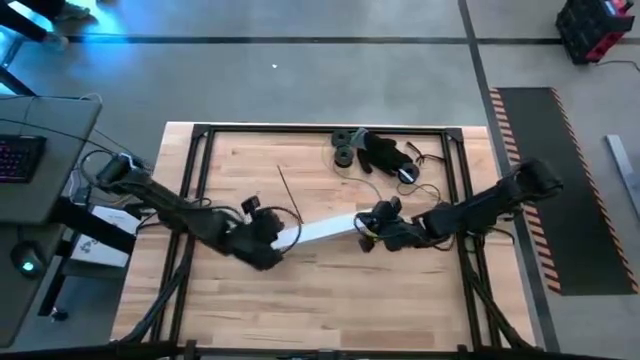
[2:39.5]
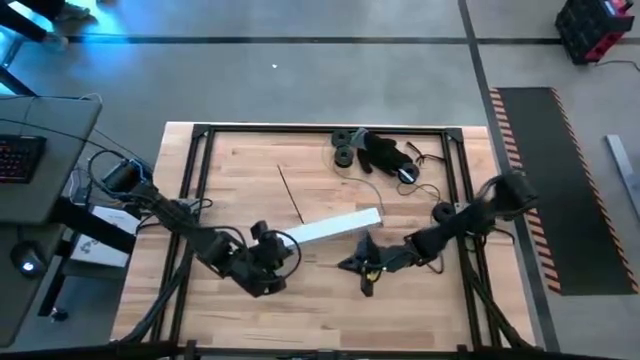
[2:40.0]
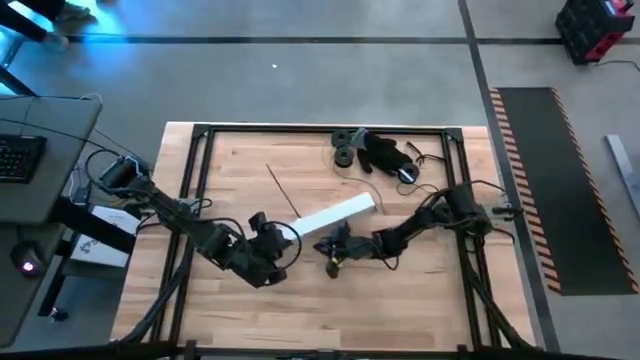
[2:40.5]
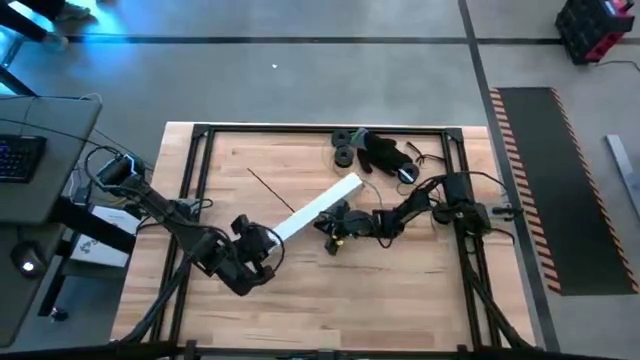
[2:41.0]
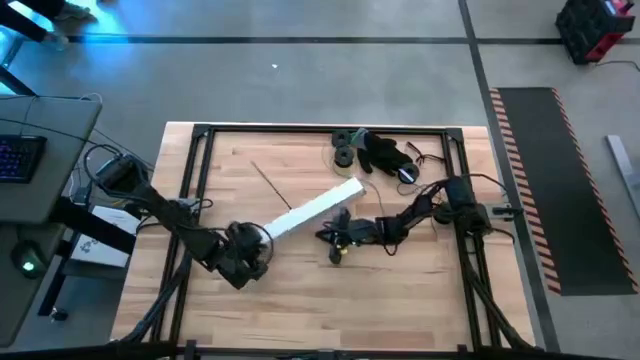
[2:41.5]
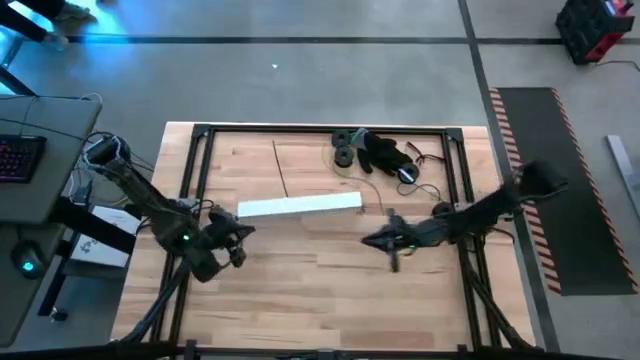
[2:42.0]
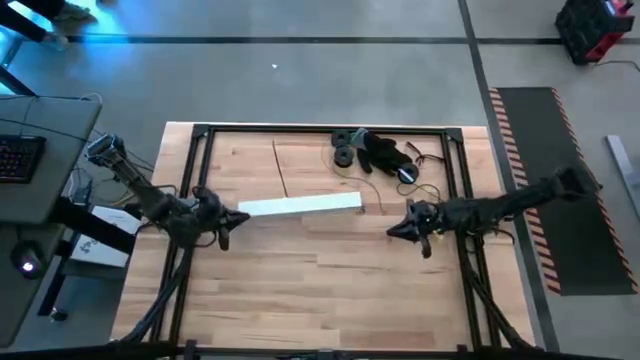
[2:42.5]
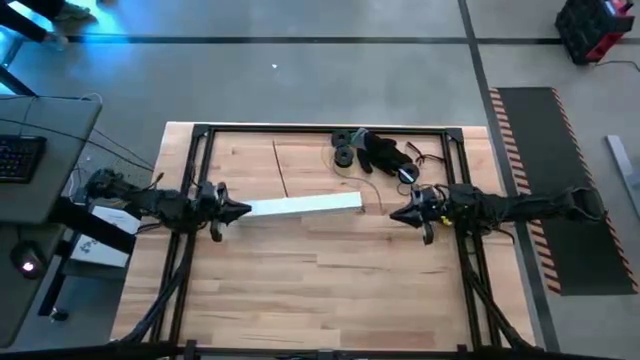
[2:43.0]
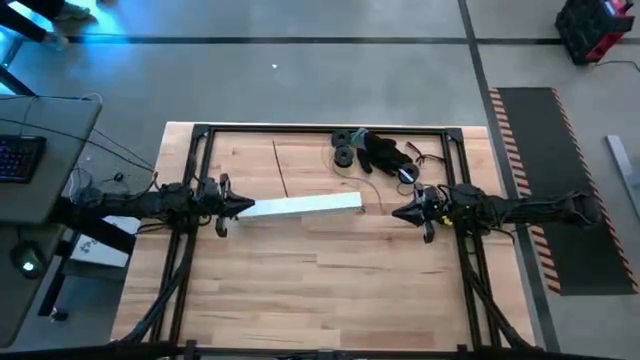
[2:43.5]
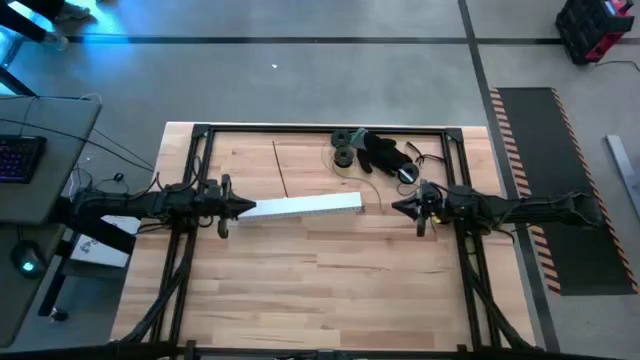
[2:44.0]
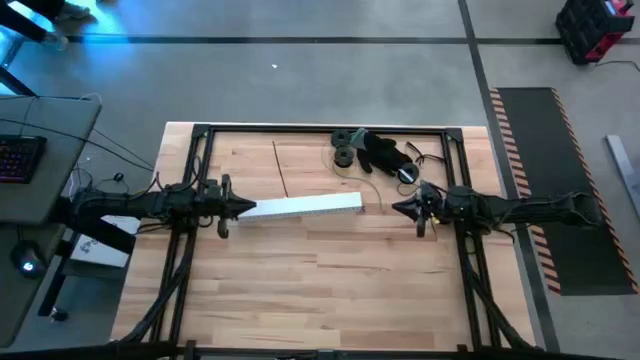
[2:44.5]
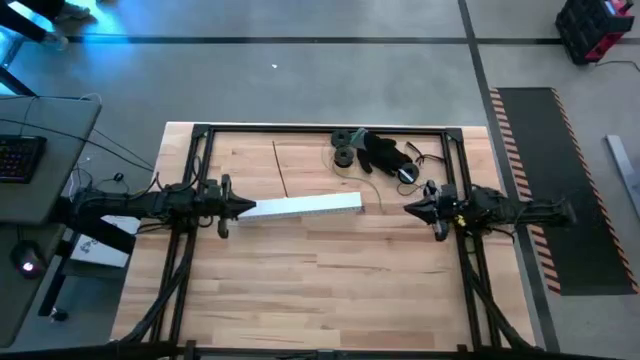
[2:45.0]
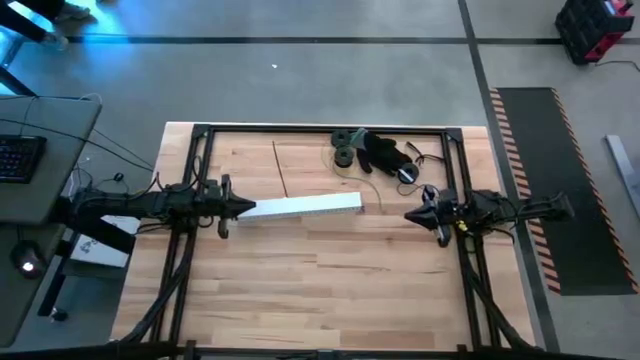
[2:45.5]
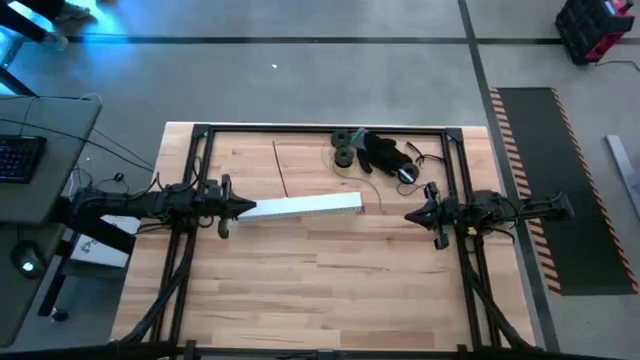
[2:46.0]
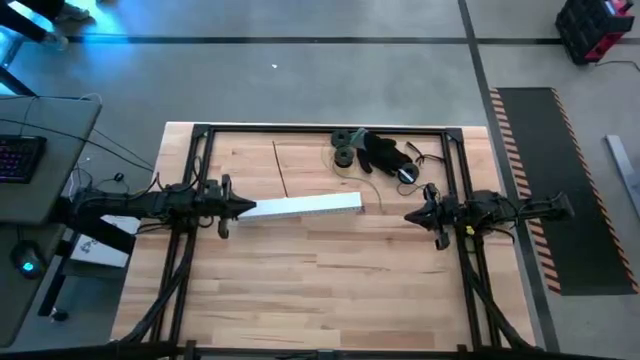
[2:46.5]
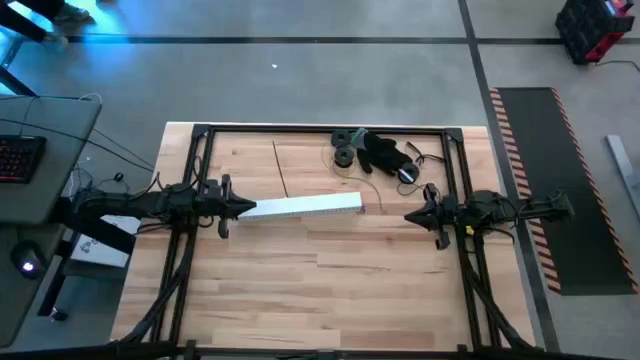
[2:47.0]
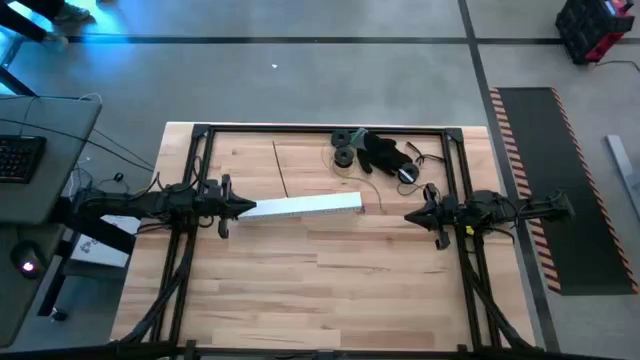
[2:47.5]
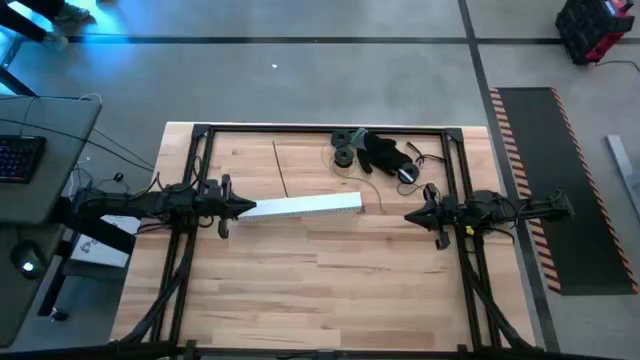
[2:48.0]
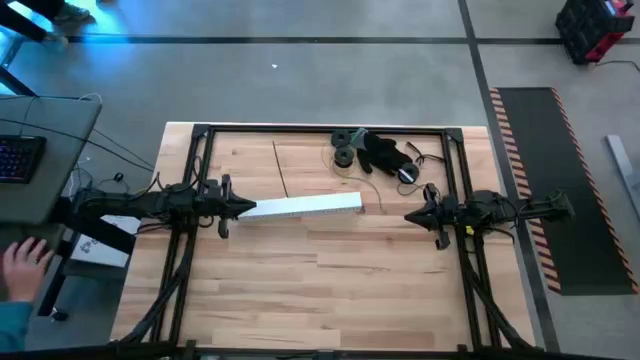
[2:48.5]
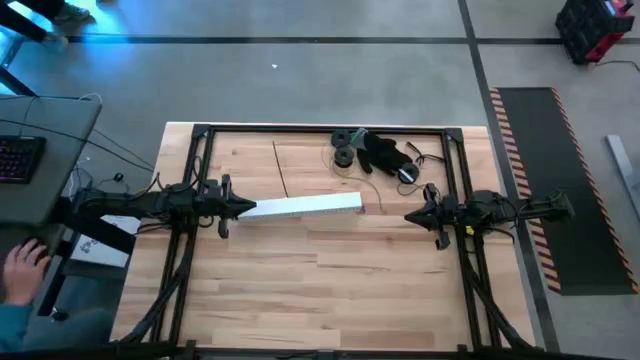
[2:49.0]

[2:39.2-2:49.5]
Task: Ziptie cables
Return to Home Position

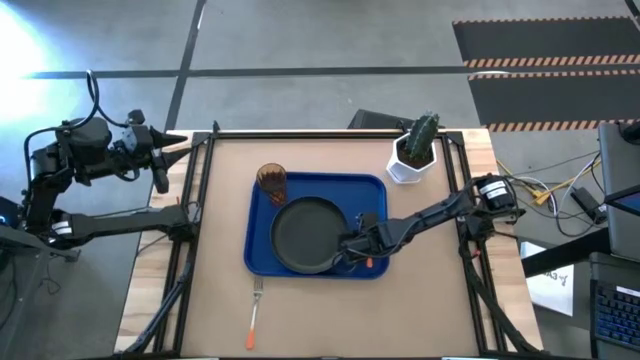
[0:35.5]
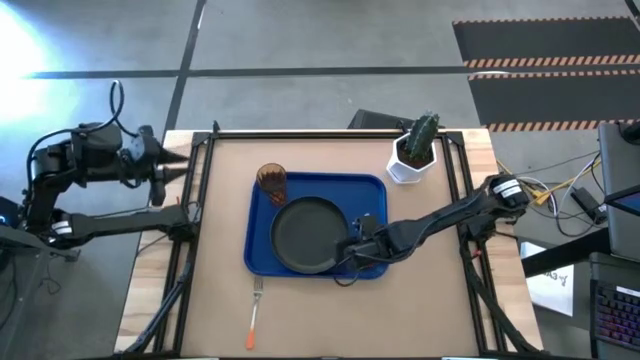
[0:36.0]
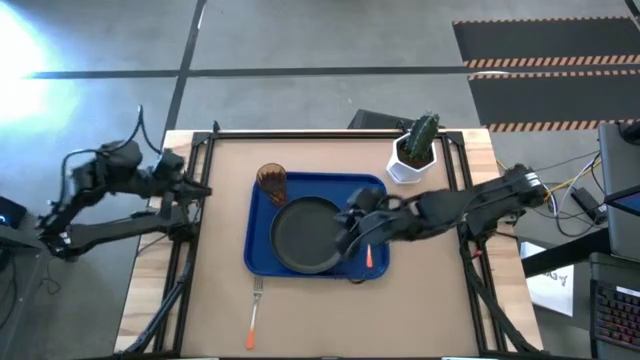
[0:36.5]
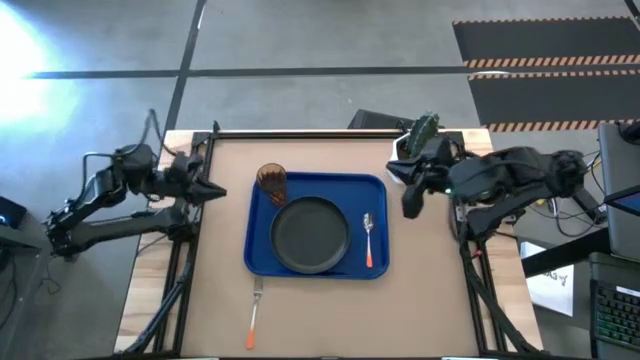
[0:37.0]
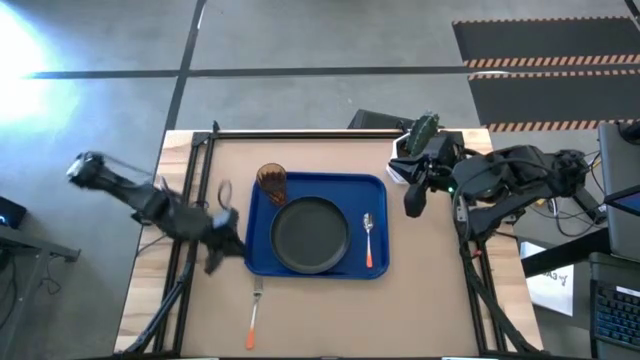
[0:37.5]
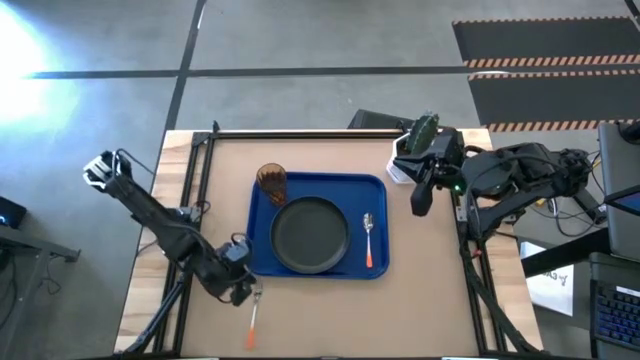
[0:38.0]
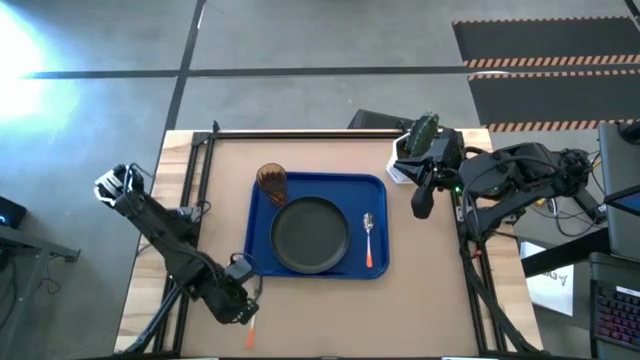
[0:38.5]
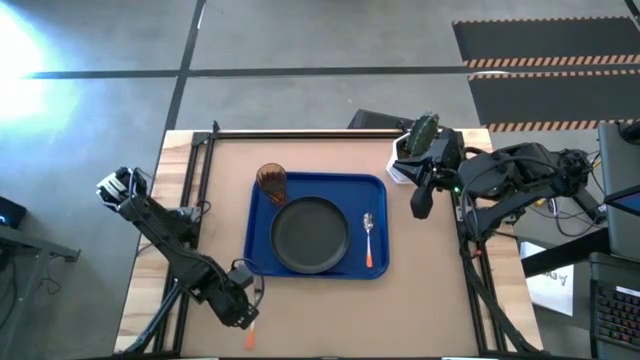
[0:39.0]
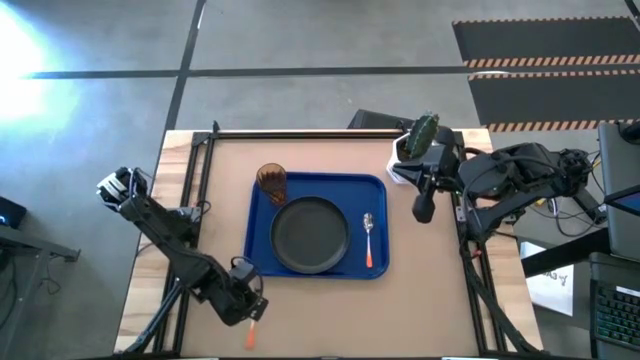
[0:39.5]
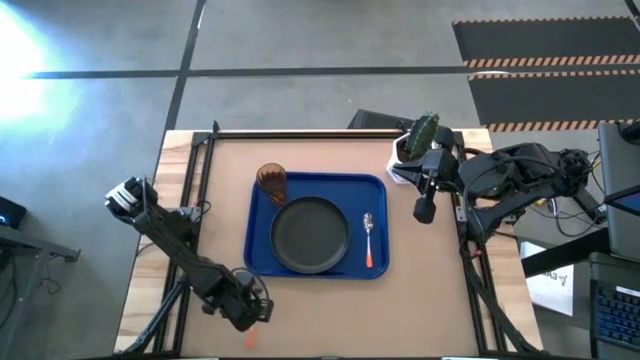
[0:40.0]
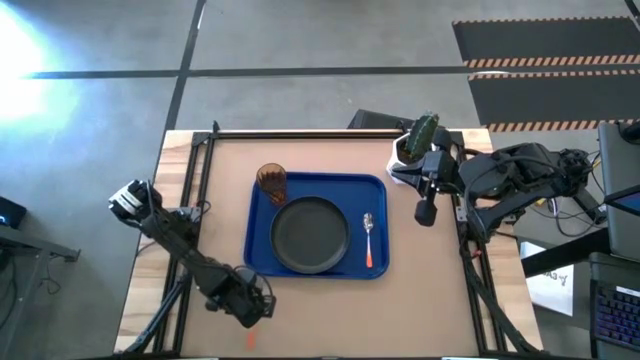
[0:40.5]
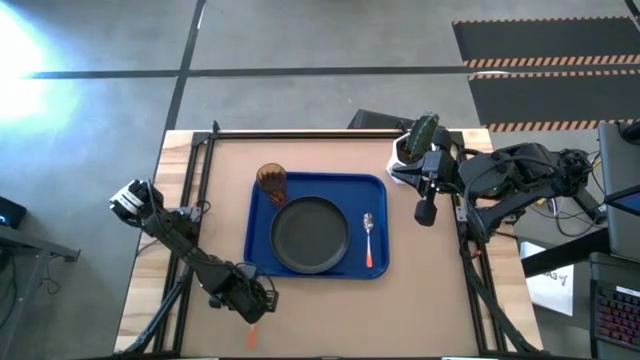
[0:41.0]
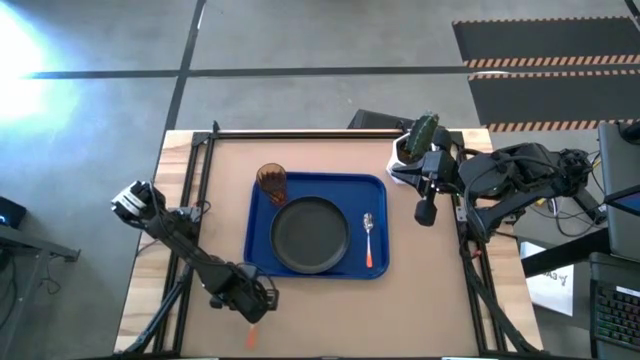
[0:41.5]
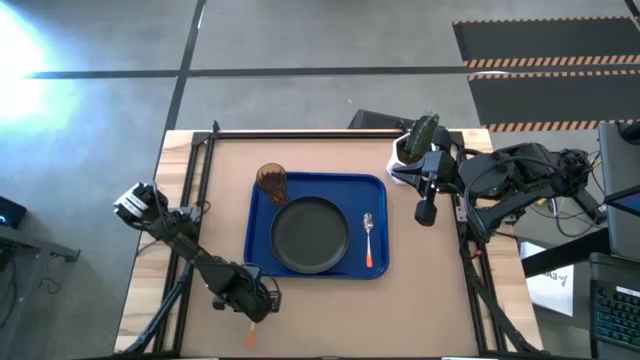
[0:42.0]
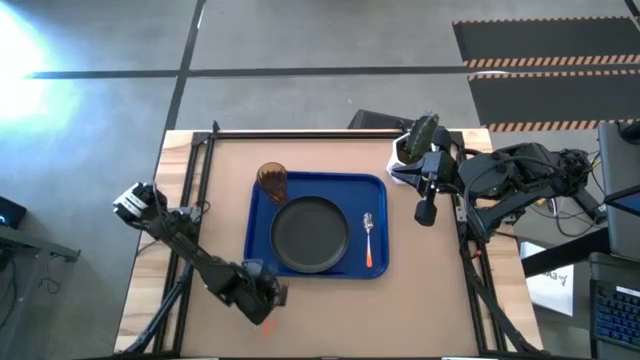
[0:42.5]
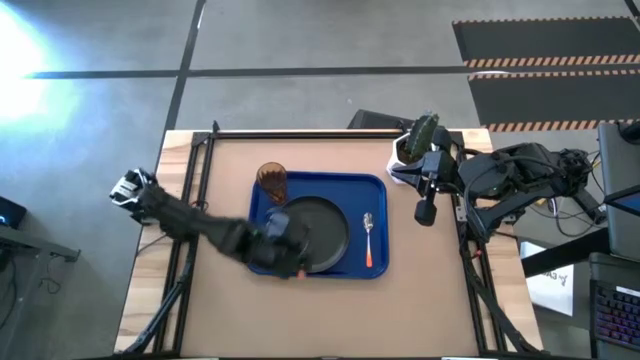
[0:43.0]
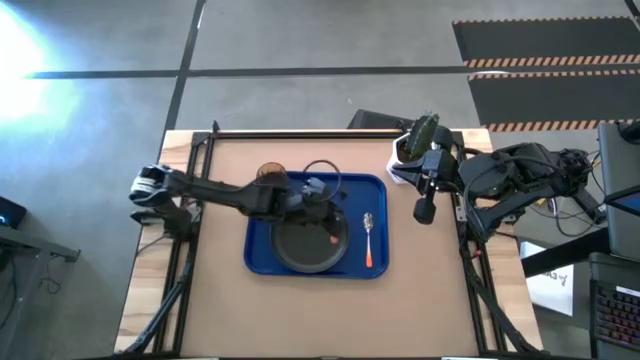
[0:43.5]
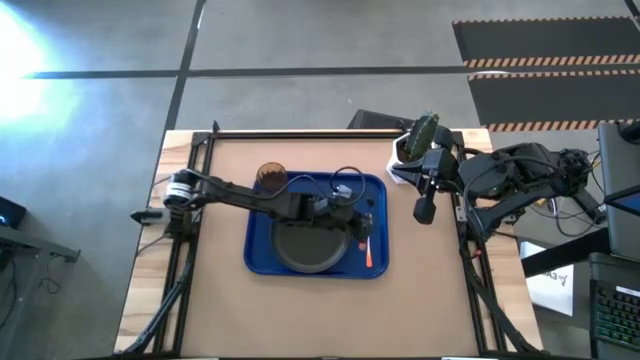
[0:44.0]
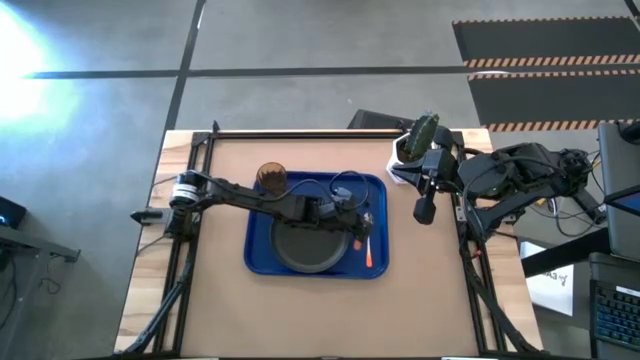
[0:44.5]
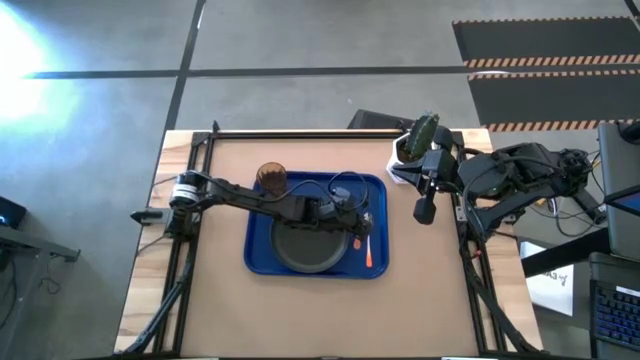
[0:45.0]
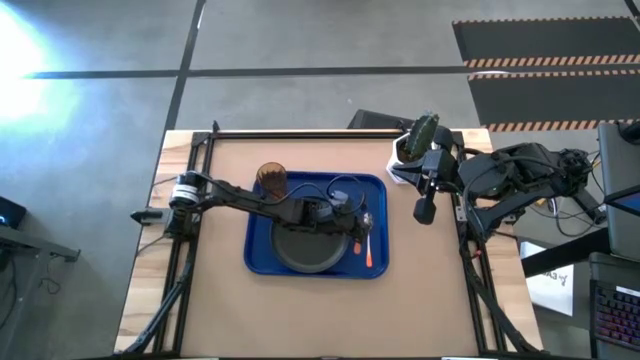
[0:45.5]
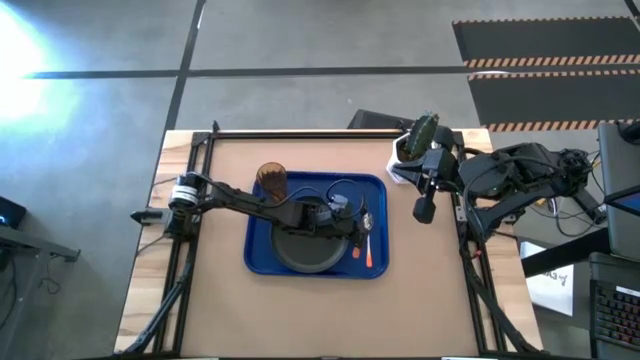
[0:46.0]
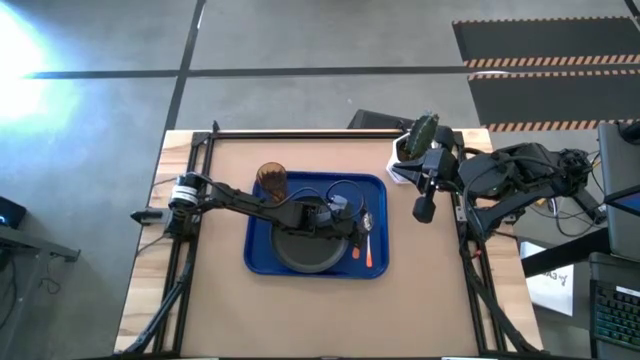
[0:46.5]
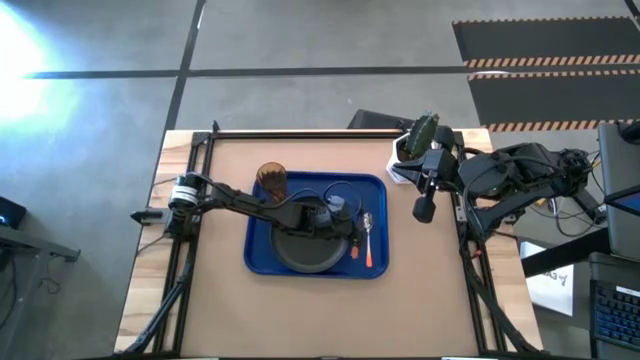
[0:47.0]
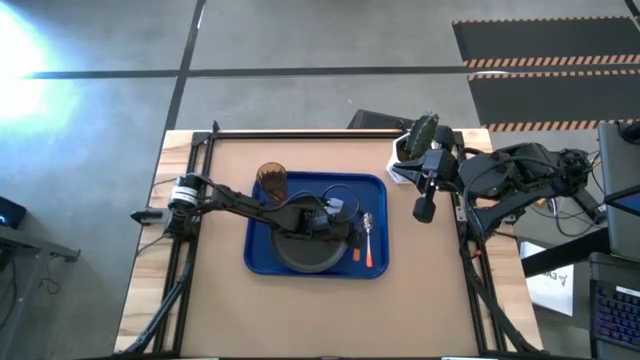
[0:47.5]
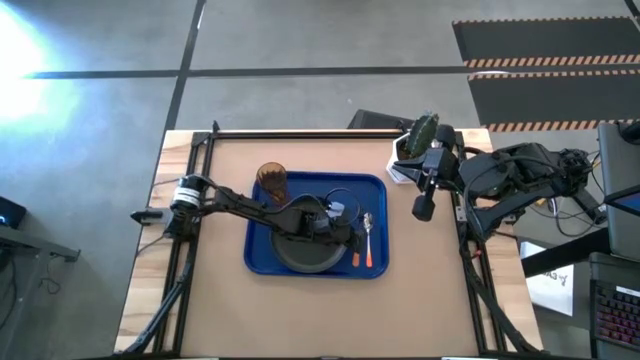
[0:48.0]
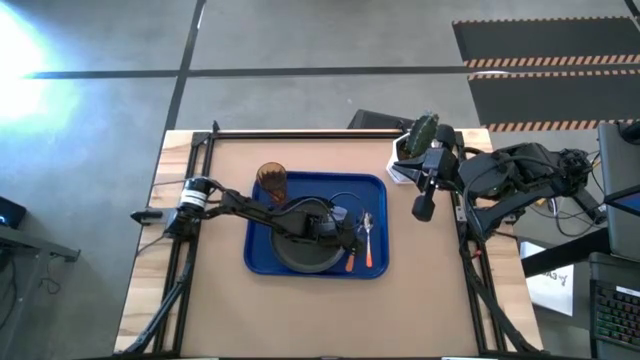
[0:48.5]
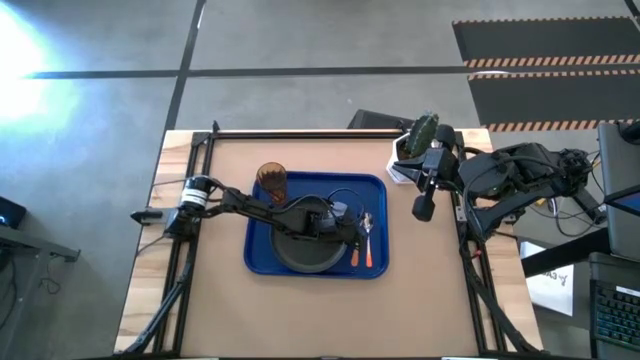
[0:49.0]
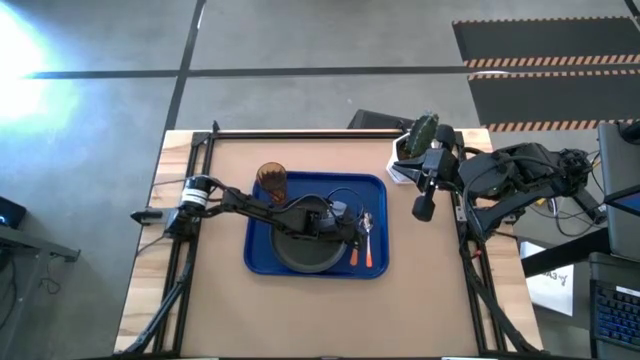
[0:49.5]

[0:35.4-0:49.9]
Task: Pick and place plate/cup/fork/spoon on tray
Put the fork on the blue tray between the black plate and the orange spoon
